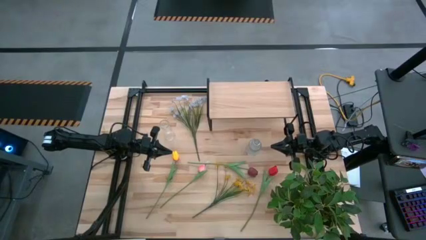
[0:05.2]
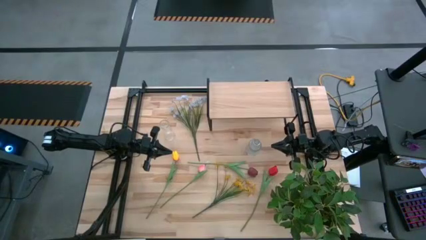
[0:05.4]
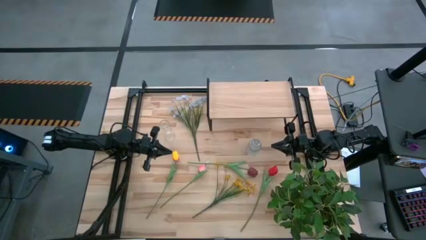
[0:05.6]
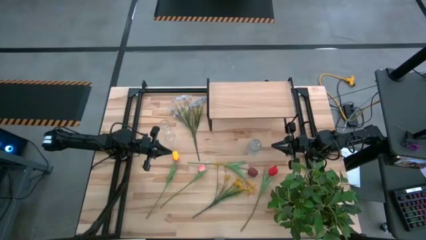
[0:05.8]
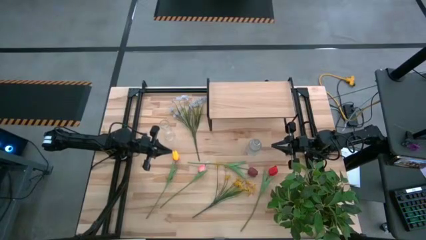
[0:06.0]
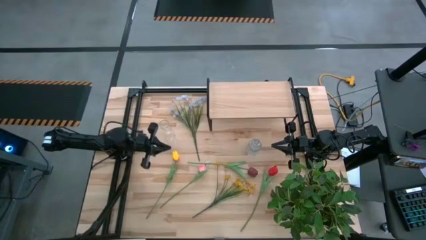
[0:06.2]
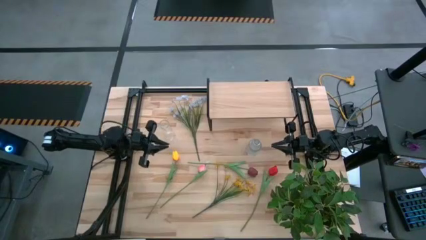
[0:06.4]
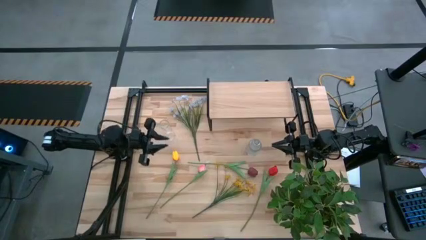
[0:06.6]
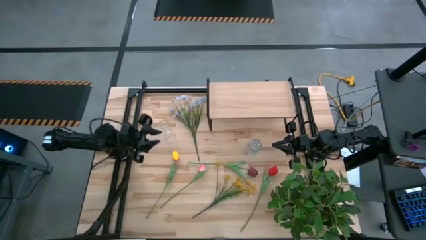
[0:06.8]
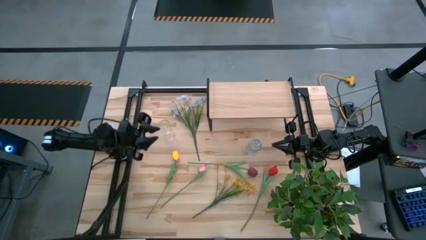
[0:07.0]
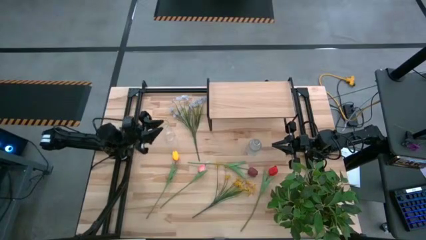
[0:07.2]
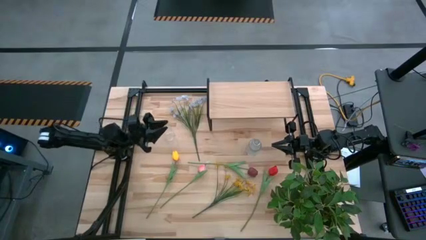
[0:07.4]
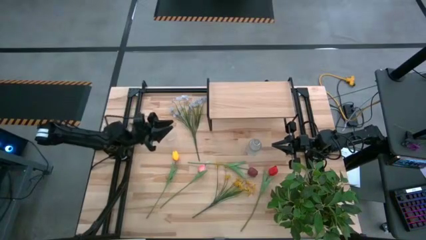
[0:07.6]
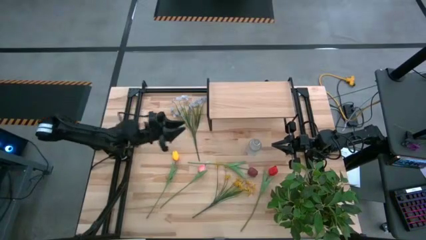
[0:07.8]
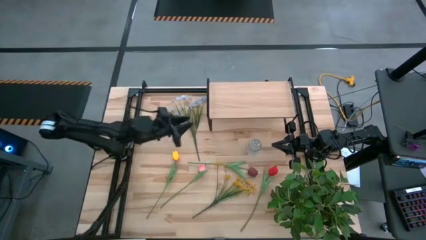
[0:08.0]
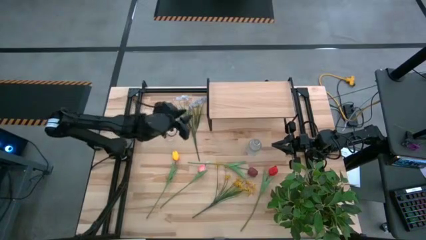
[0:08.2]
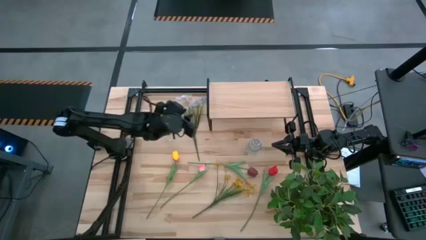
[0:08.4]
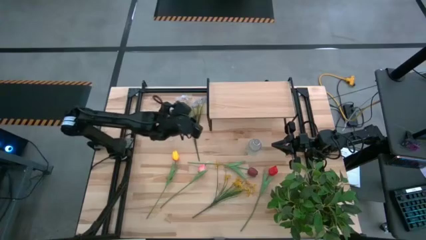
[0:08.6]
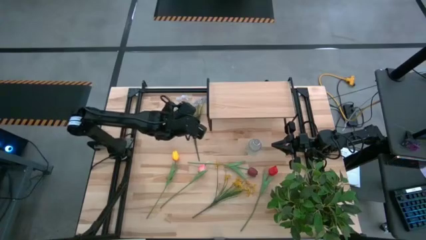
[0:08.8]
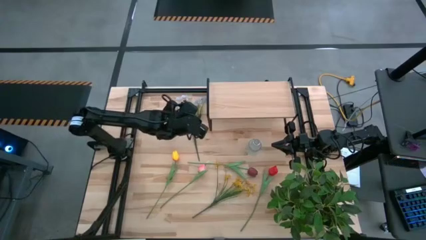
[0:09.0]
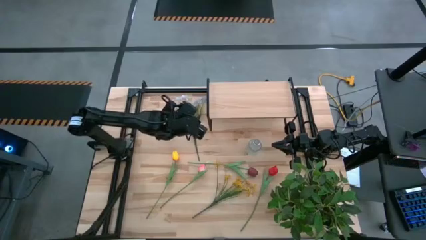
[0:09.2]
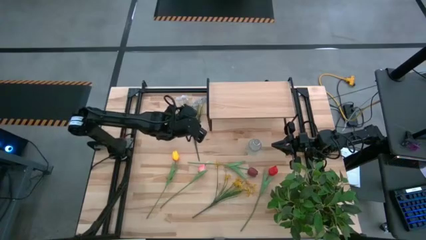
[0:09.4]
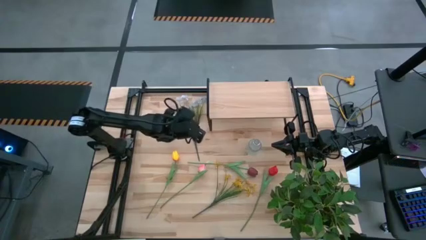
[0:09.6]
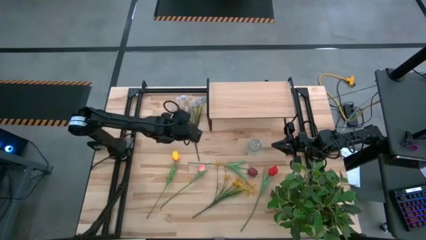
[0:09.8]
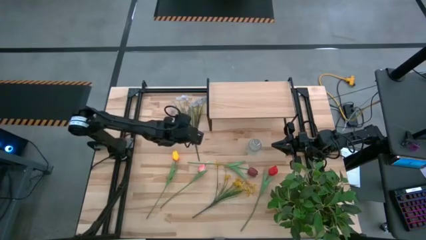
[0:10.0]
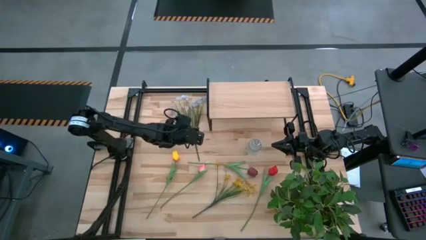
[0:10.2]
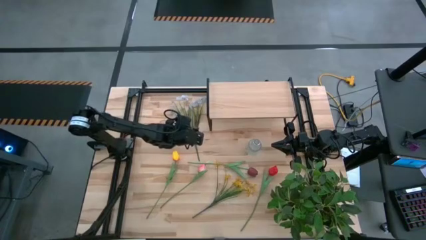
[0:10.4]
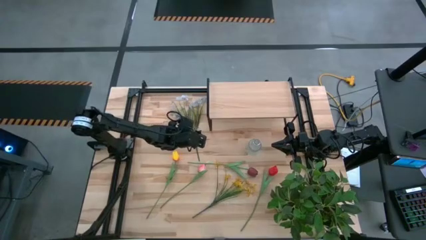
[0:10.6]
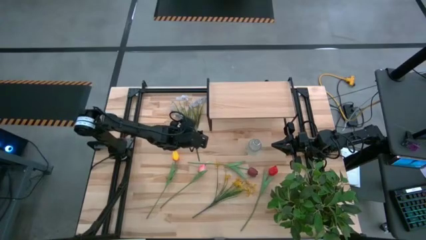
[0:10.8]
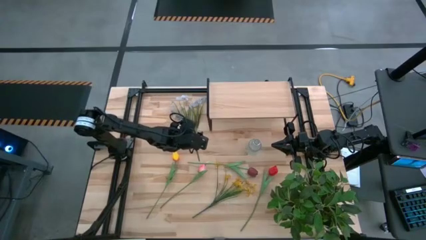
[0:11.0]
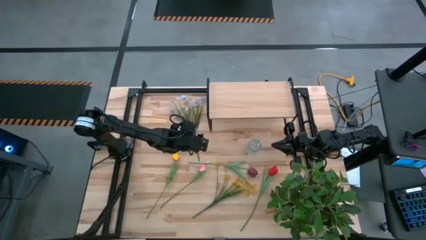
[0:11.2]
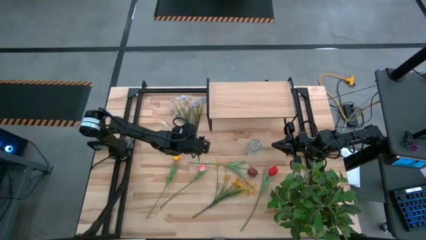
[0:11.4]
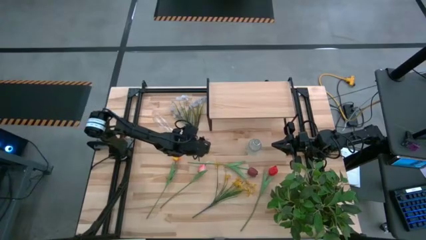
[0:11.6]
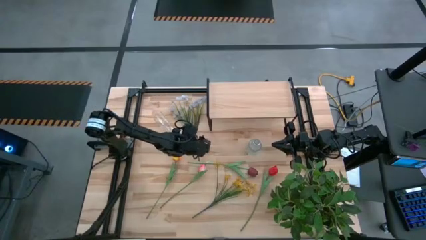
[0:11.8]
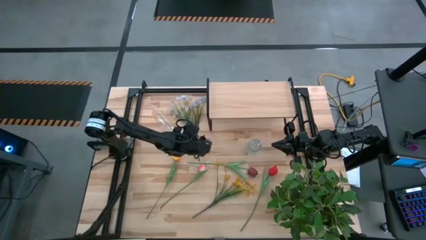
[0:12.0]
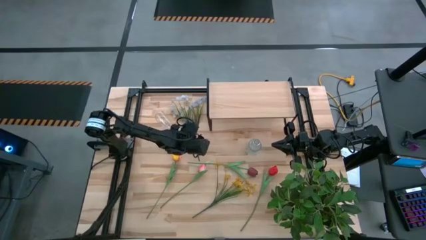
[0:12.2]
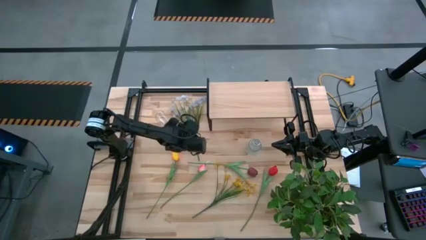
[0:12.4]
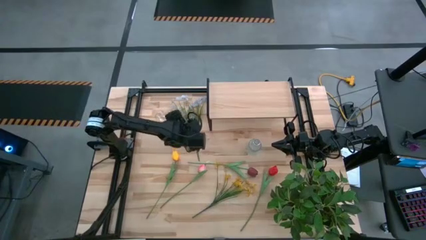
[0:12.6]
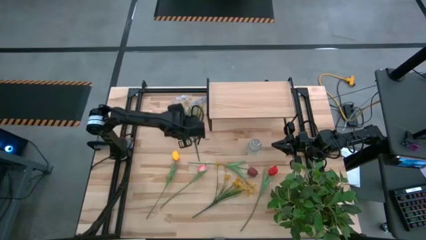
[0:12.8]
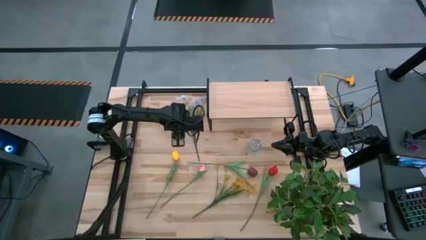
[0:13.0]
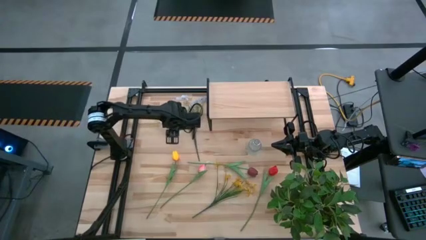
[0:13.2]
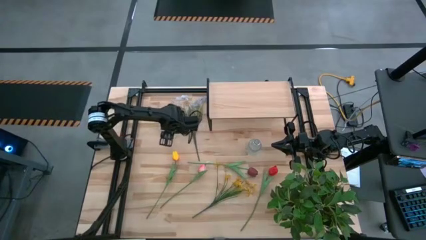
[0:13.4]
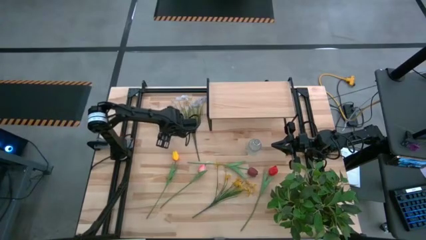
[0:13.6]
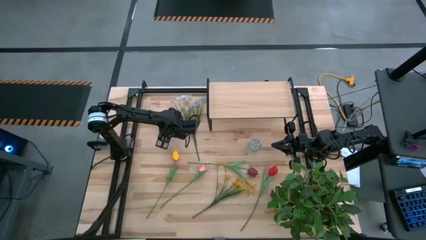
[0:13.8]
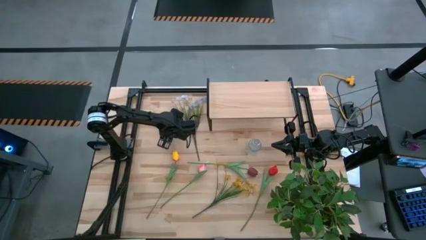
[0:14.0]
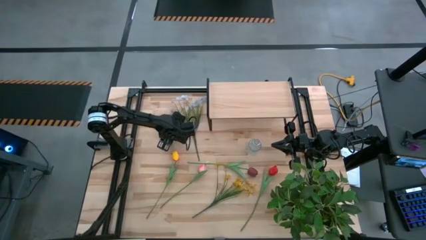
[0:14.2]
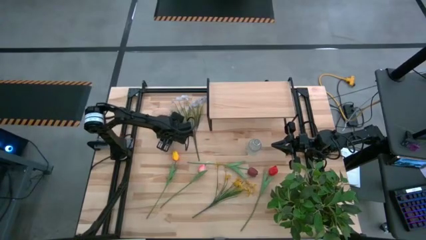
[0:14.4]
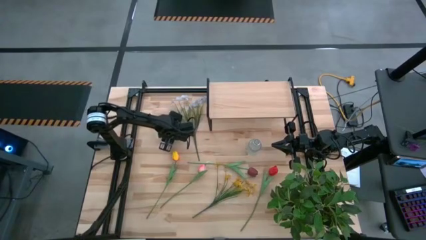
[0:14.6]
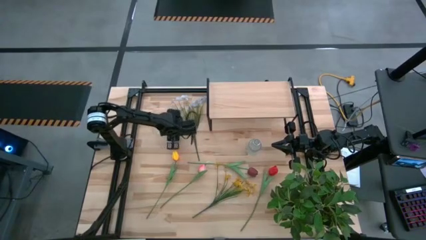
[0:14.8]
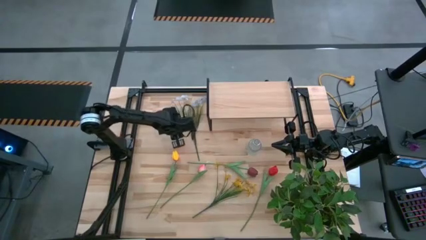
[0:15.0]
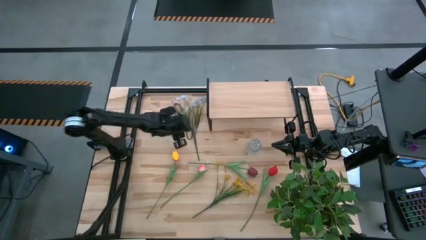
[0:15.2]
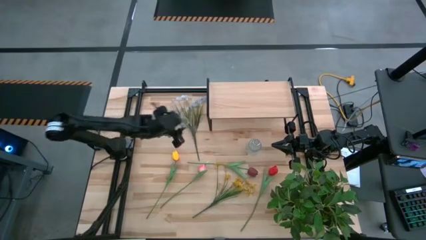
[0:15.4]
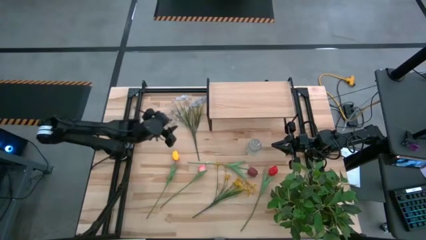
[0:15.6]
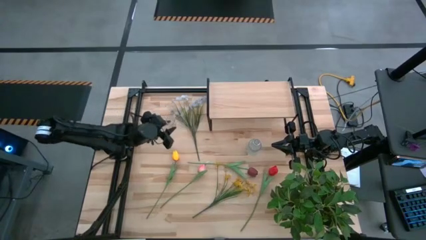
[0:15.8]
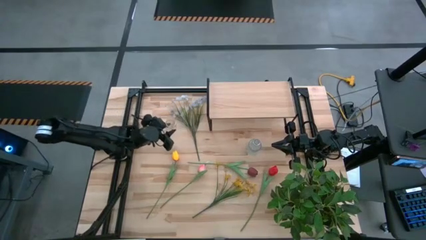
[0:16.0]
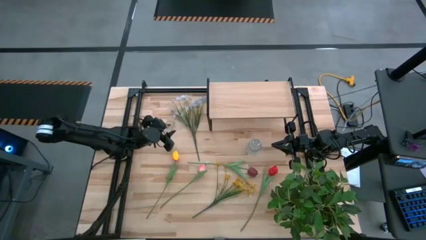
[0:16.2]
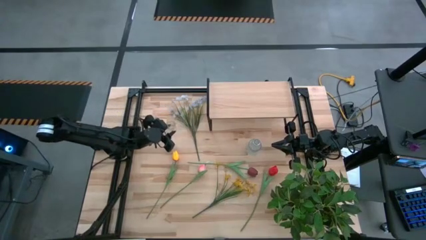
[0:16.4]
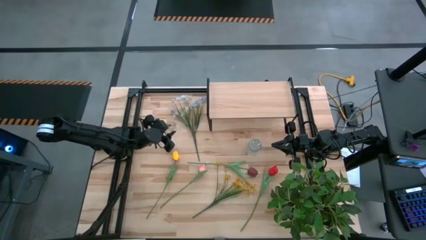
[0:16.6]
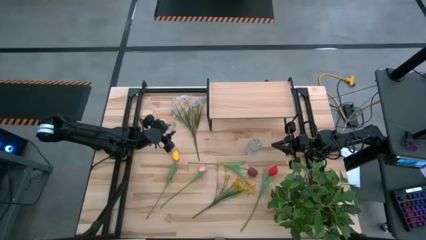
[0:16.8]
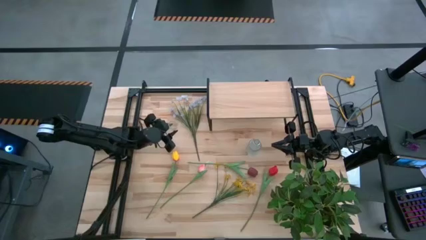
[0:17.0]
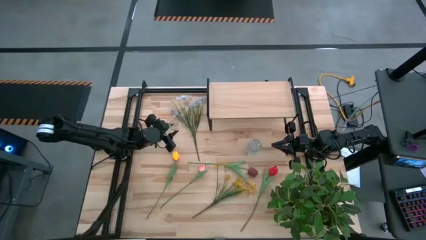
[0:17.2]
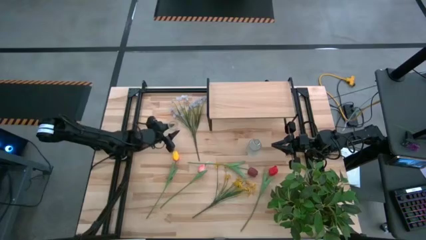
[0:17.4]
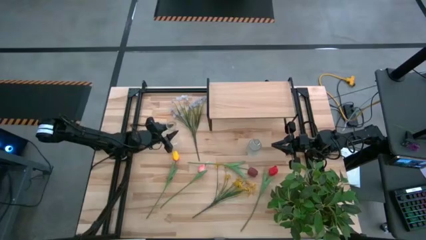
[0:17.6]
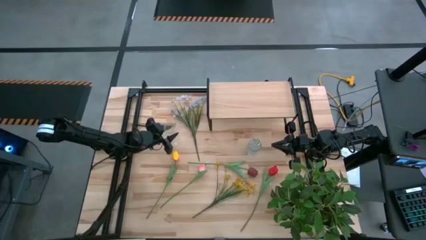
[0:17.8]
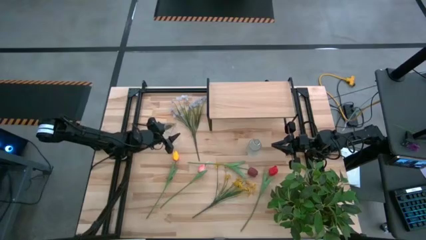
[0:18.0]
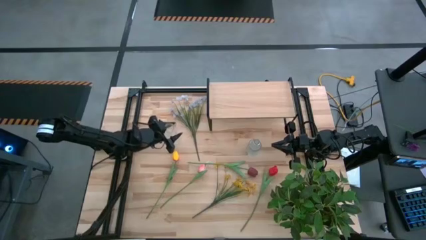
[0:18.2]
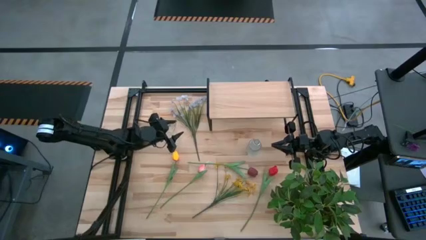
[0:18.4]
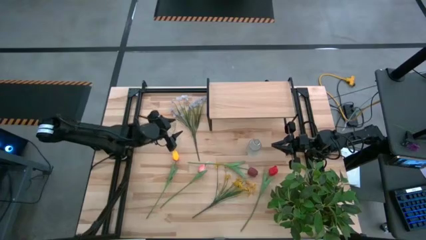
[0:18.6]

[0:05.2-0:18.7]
Task: Pick and place flowers into a vace then onto a shelf
Prepare the left transparent vase

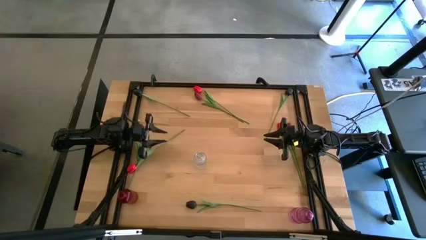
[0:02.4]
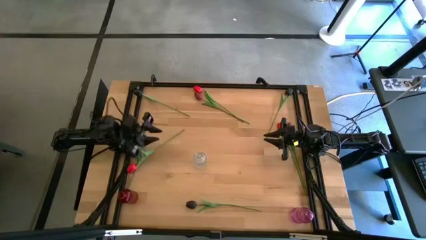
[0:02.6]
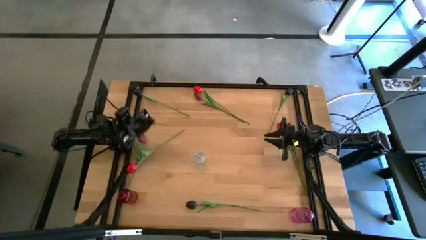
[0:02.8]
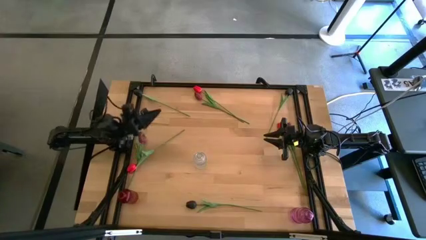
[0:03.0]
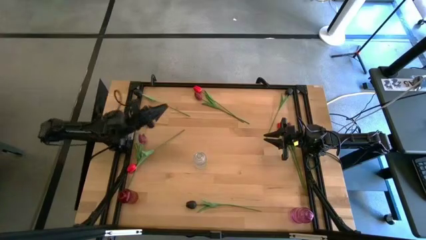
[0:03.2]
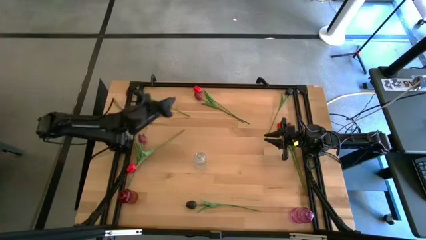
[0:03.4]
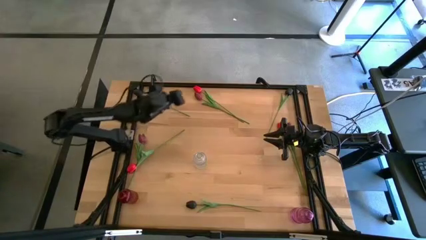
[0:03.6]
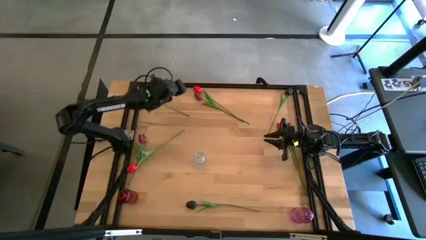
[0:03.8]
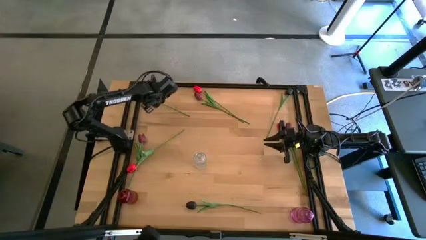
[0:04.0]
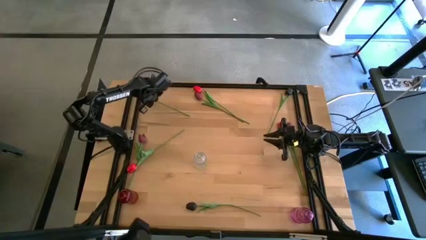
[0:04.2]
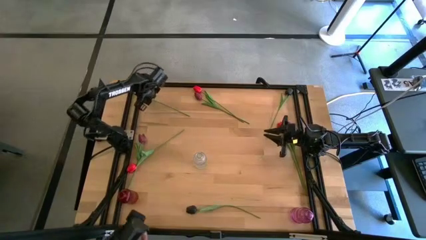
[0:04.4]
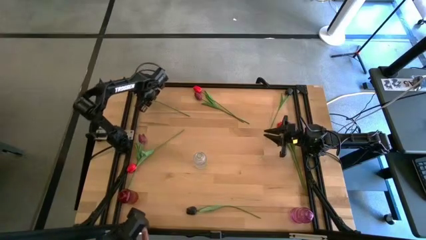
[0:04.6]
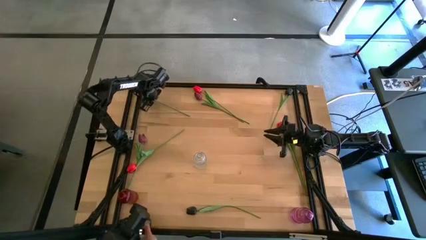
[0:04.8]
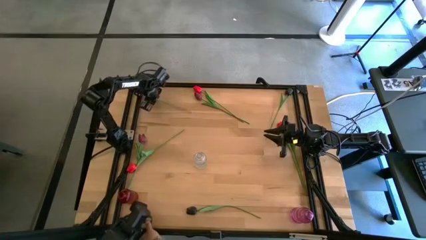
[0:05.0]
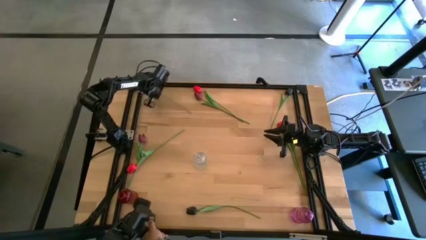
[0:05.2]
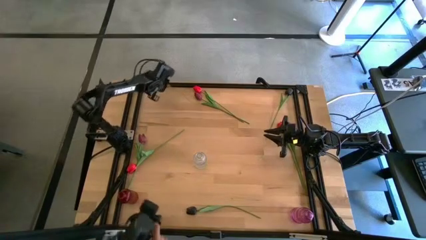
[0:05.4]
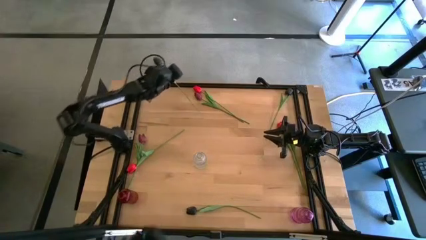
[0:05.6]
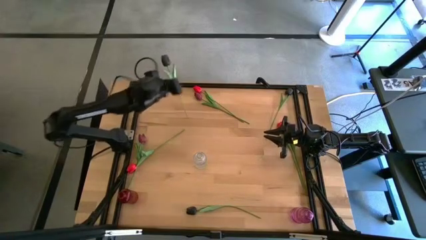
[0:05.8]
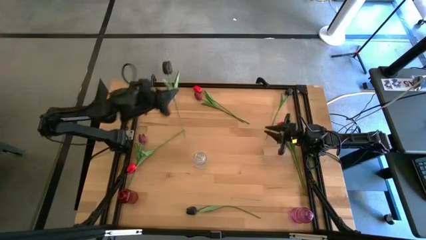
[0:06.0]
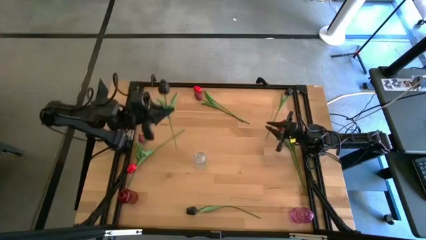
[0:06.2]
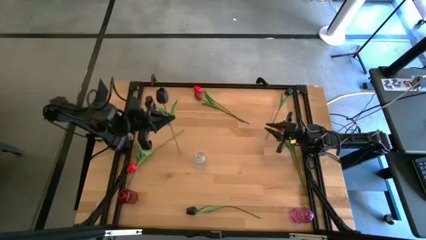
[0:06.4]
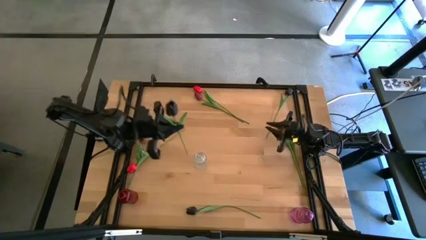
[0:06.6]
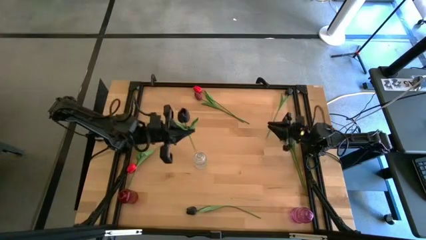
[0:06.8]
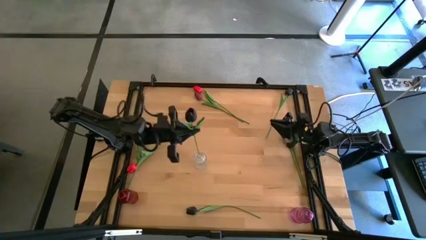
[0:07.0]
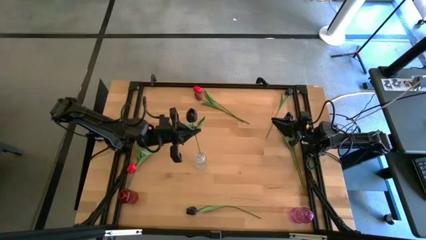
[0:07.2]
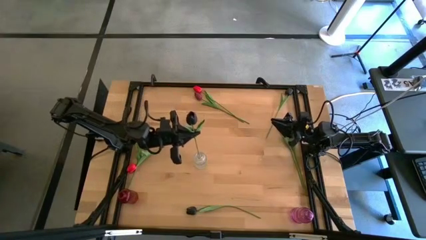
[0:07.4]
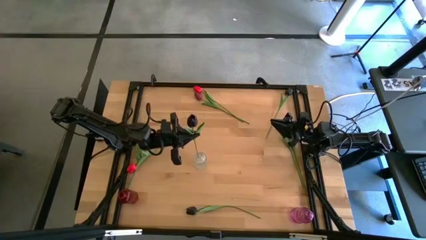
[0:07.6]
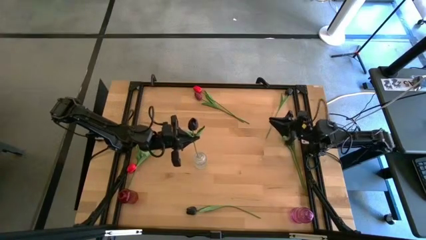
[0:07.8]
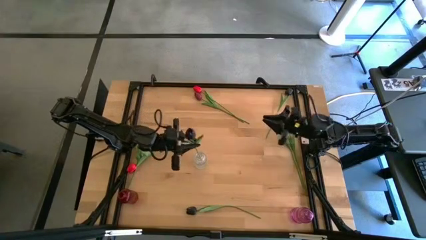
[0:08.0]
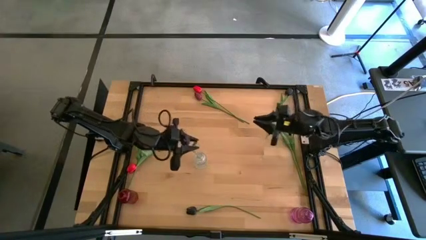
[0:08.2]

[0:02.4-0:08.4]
Task: Sort flowers into vase by color
Put the black flower into the transparent vase
